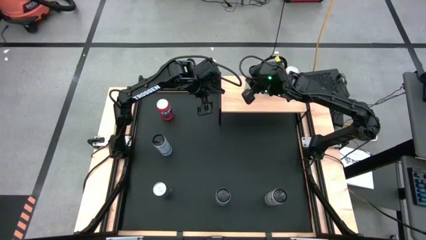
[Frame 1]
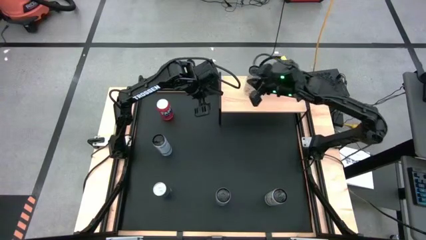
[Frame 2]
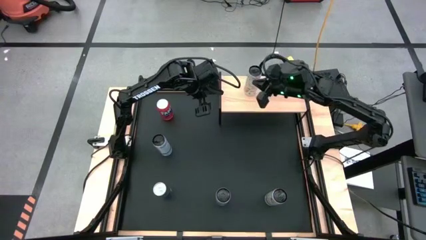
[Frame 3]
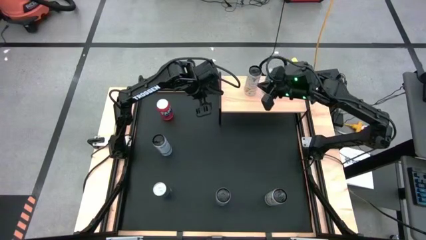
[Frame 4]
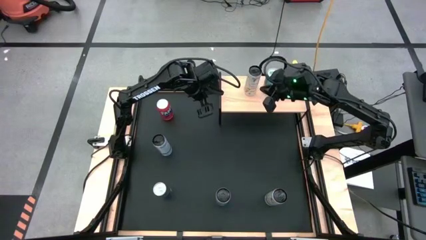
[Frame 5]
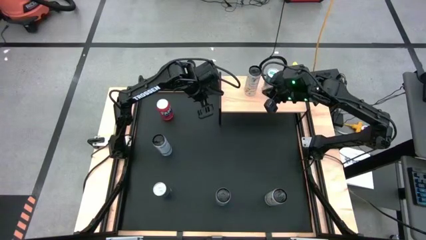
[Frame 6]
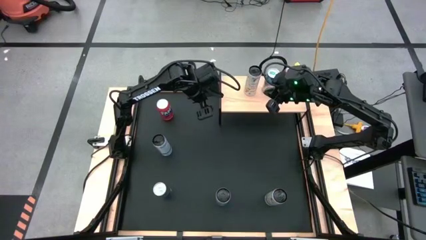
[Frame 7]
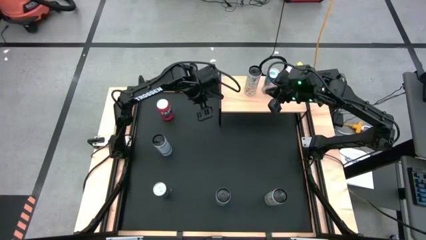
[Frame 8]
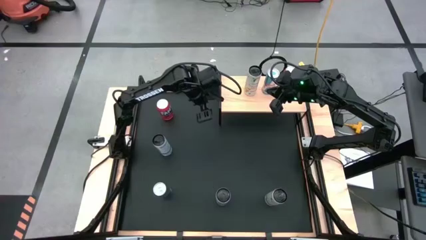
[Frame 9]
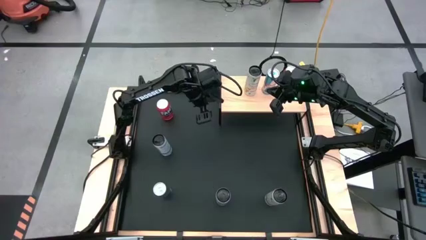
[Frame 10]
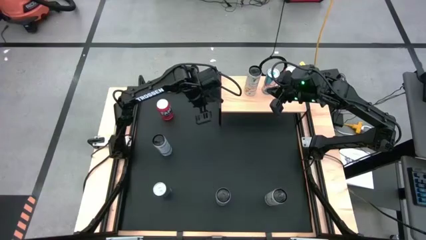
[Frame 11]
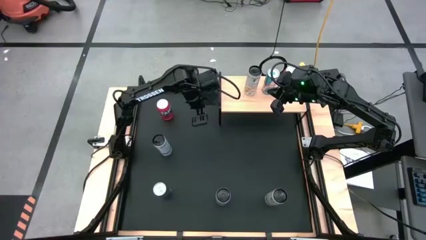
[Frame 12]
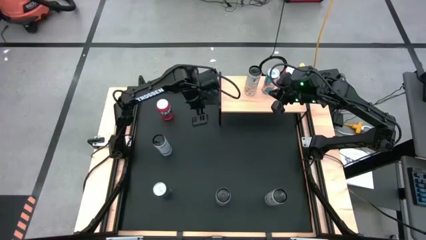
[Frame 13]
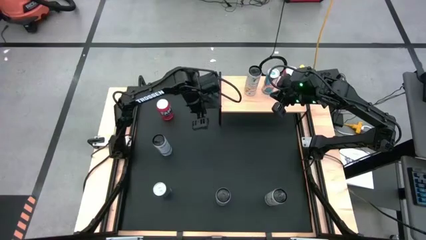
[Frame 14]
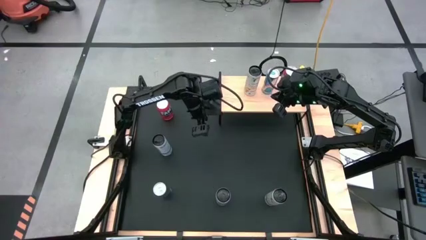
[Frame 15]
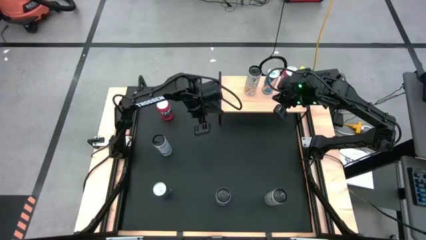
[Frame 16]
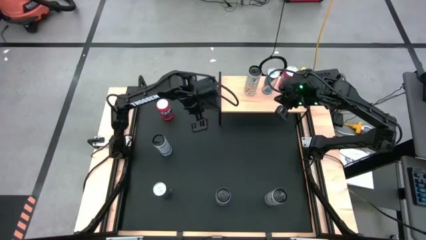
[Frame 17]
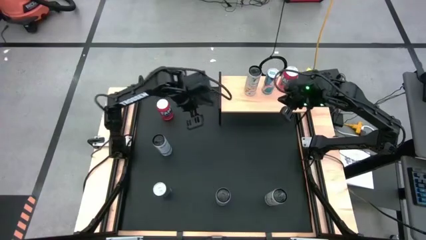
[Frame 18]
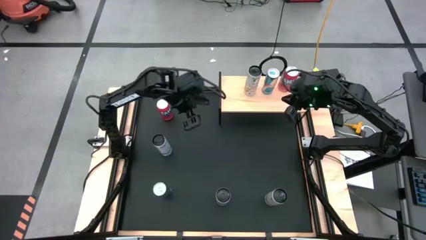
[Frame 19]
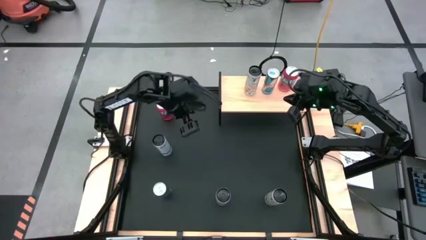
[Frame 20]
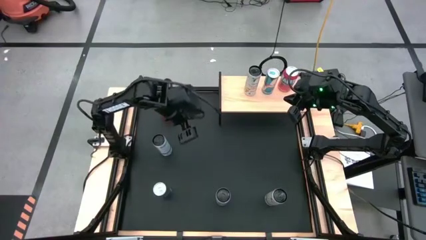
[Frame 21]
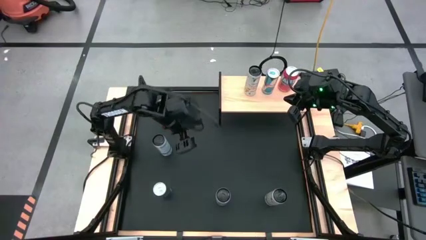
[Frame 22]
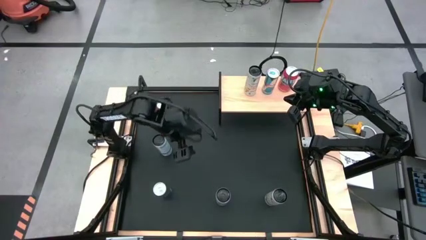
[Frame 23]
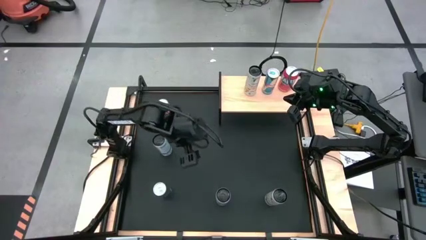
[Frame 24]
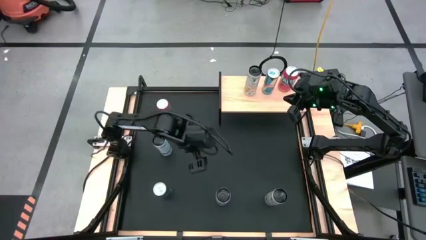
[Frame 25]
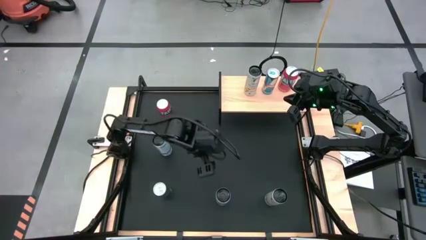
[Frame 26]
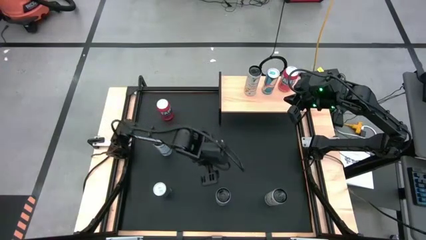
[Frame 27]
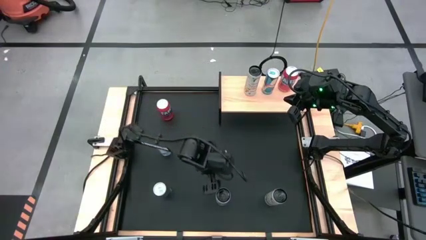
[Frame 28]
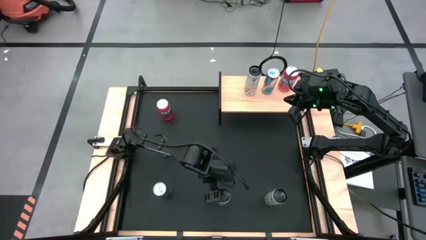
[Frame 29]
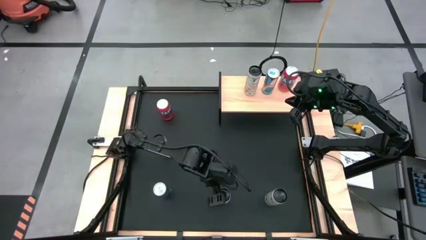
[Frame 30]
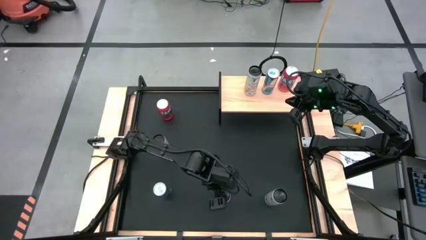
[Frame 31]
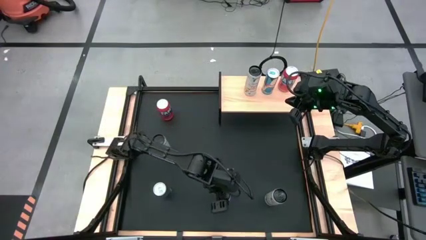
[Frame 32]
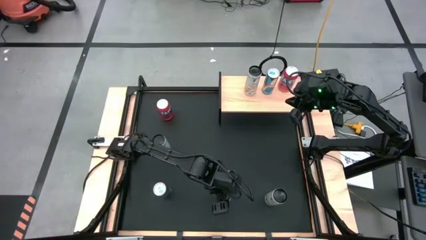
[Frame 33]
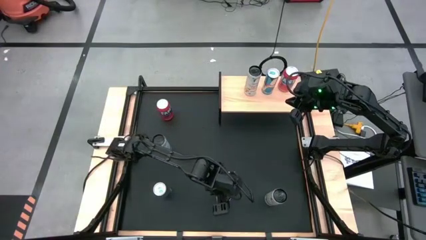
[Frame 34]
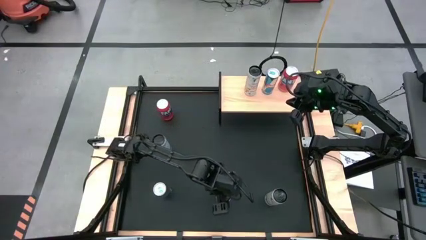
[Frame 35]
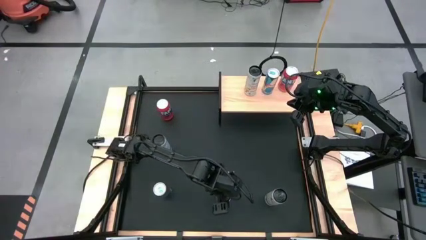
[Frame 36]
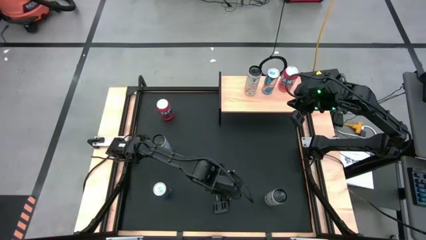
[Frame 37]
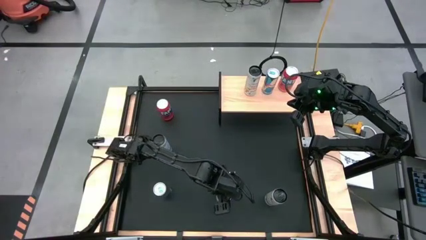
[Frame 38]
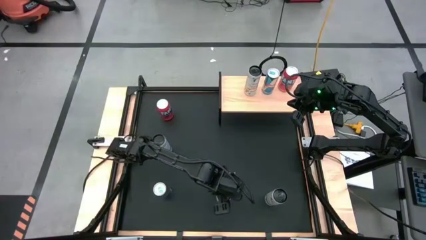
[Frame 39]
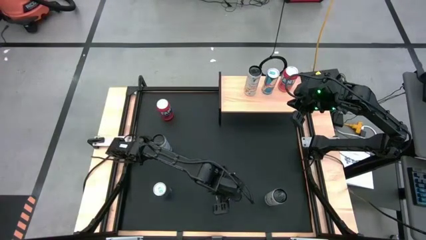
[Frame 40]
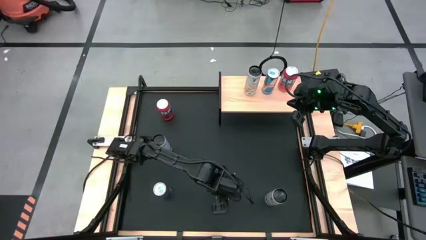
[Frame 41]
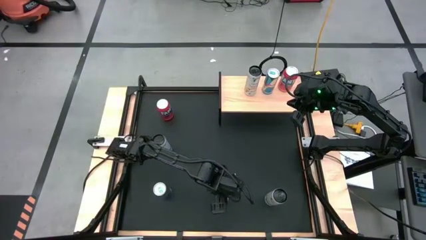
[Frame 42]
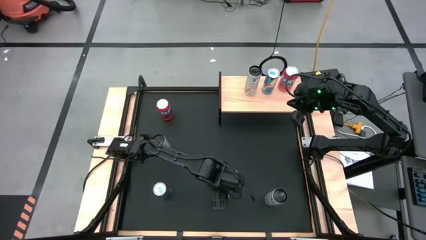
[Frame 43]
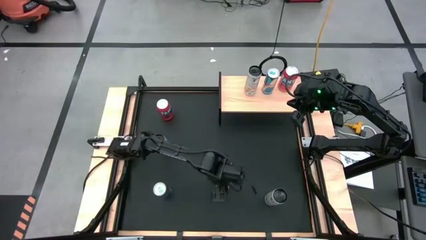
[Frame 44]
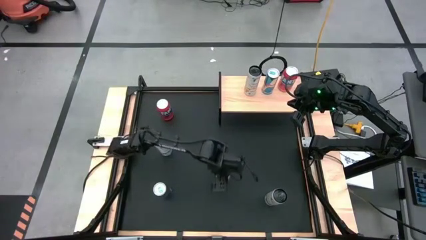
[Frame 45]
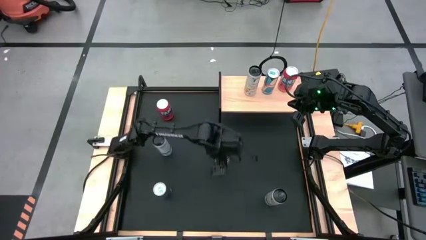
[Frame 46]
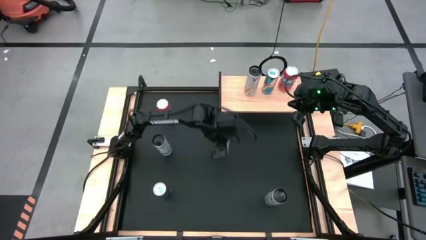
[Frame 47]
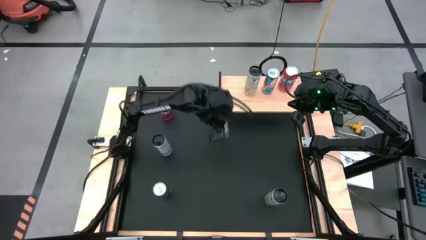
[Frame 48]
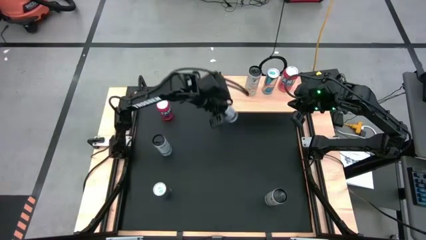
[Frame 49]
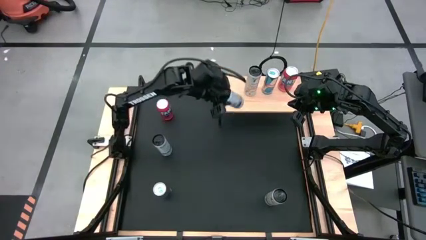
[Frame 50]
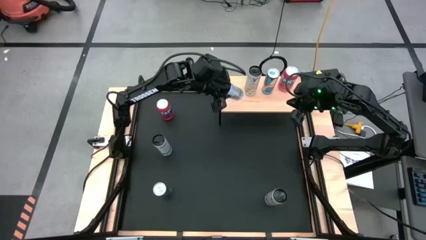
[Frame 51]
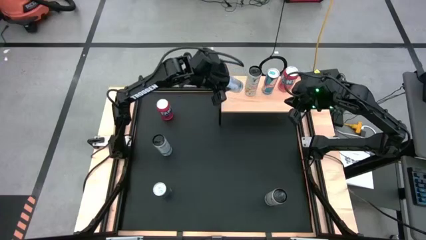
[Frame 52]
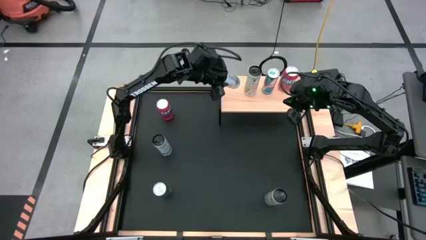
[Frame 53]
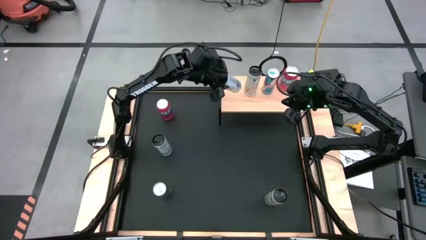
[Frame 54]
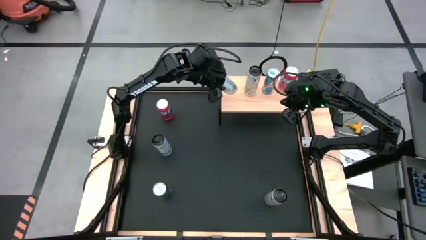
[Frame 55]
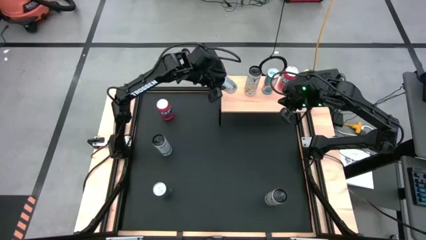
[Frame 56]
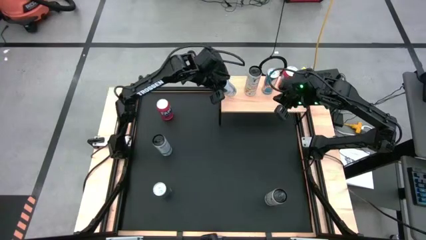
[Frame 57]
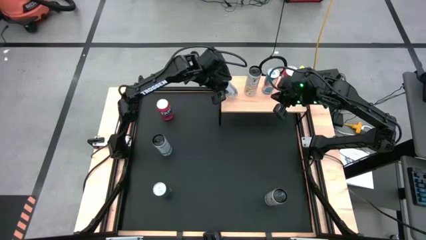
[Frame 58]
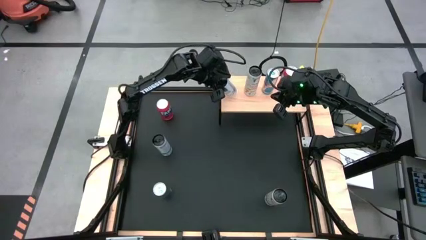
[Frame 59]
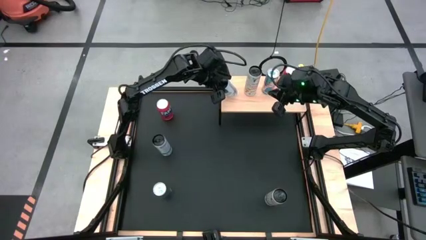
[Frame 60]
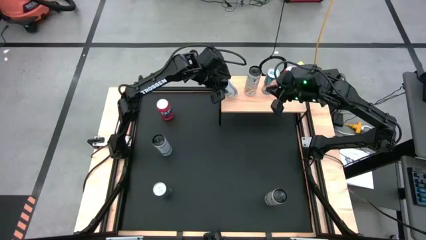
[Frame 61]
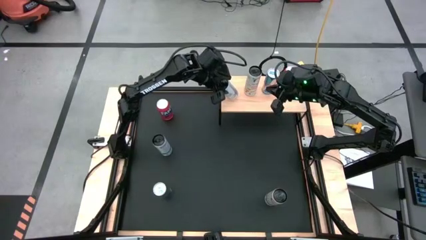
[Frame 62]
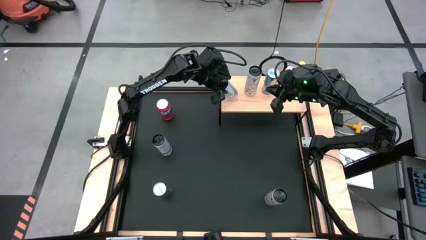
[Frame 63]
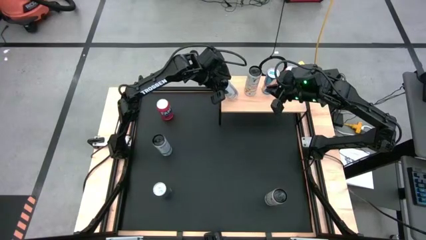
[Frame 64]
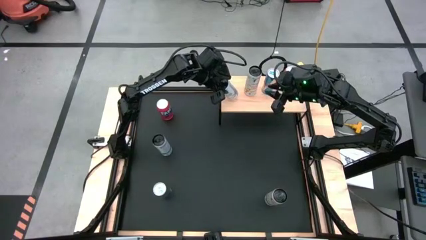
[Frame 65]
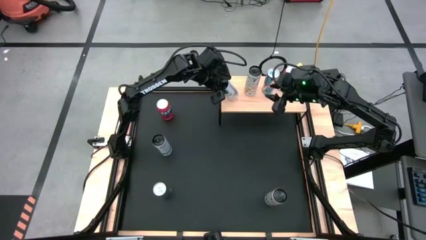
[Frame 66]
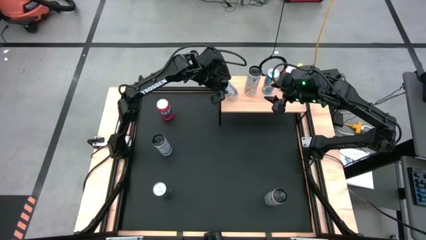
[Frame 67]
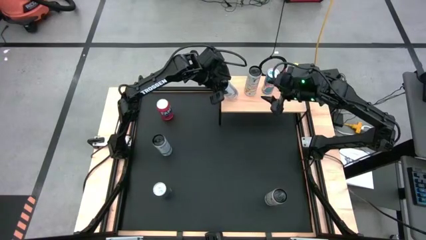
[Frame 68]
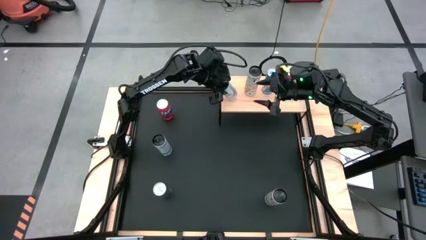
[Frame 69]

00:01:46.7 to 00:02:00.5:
Task: Place canned beverage on shelf
Put the bottom white blue soda can on the shelf
